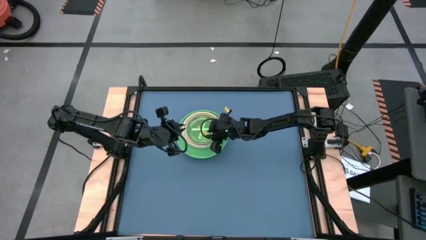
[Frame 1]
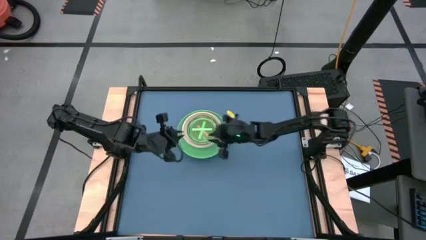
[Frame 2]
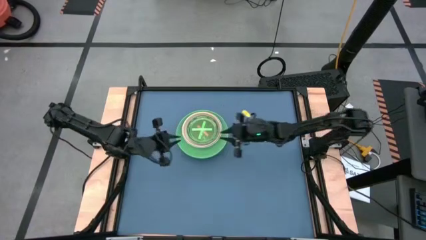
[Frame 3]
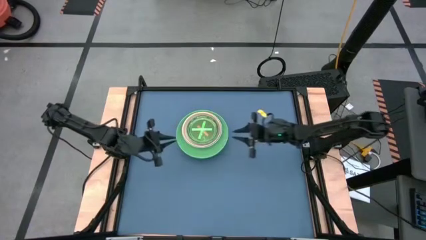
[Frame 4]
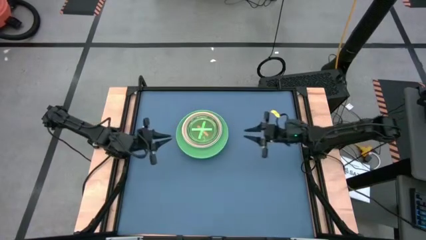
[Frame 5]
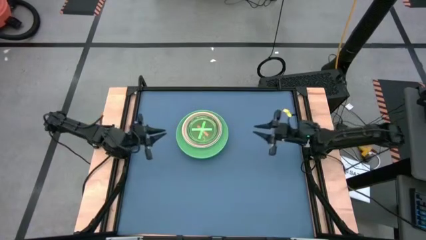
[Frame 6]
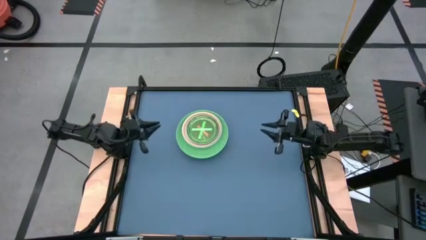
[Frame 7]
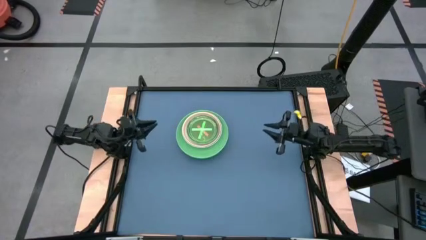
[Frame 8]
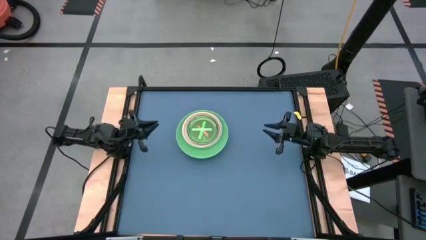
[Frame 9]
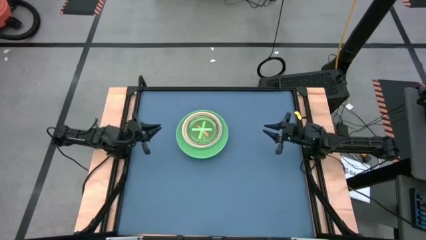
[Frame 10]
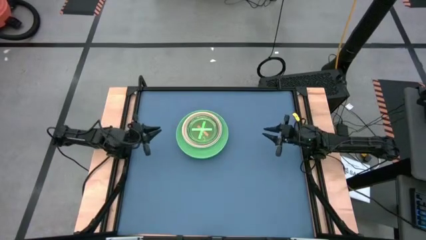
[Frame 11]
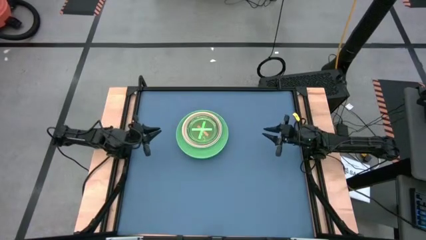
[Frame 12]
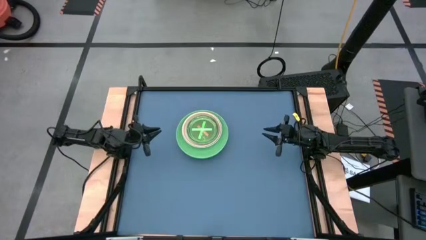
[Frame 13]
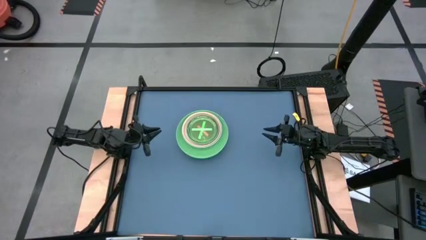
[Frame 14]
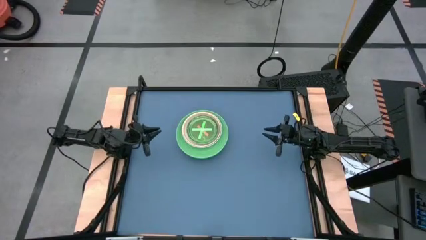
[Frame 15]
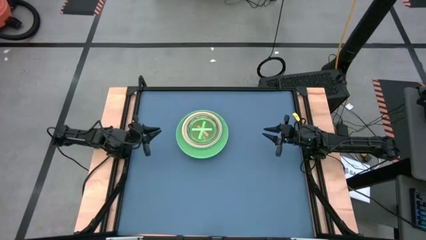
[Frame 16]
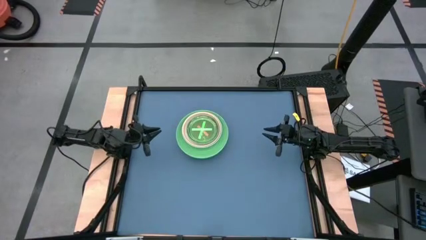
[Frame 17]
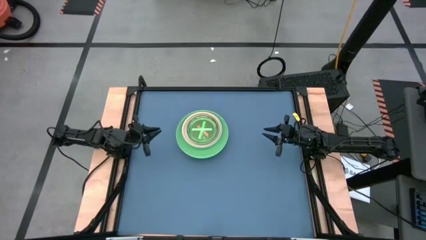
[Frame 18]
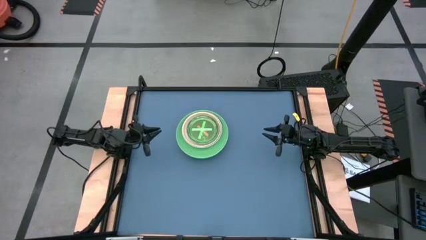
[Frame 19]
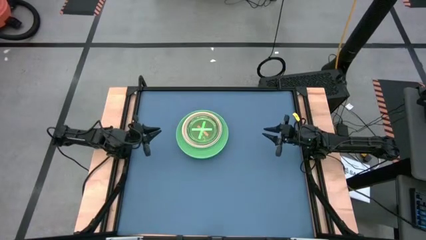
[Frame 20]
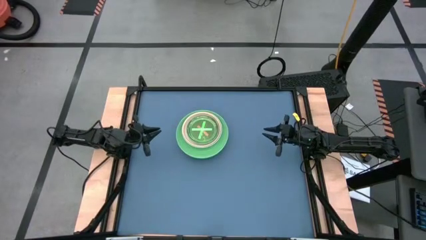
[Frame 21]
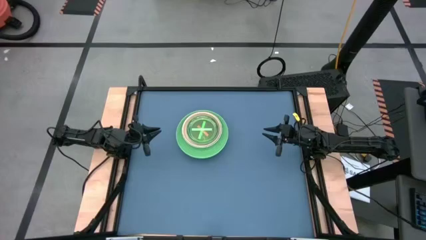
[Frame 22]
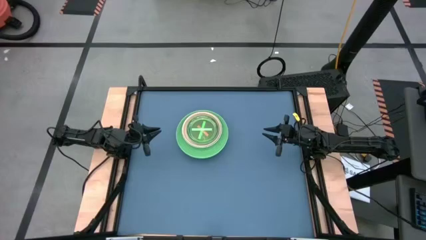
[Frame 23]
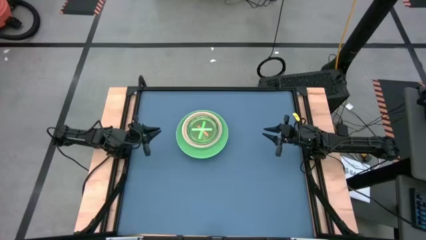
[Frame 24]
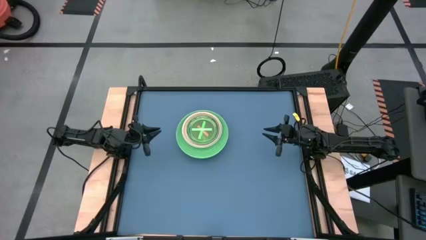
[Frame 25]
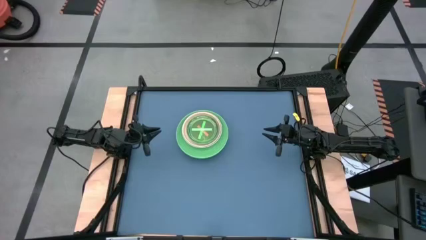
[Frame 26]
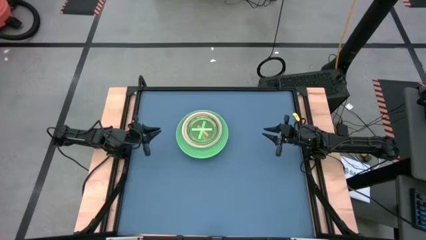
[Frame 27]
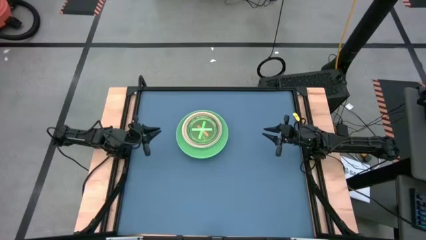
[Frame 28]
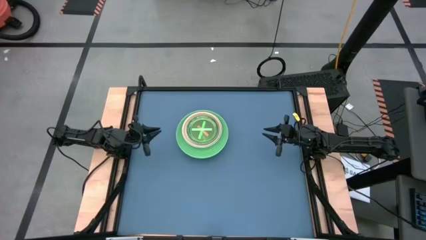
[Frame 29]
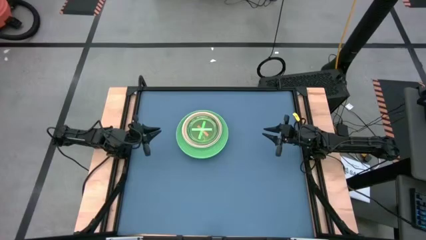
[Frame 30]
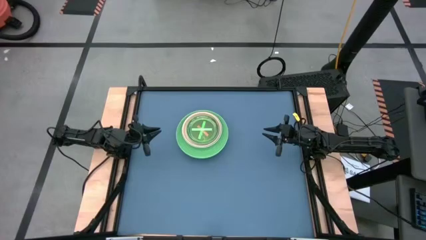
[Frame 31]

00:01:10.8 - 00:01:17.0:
Task: Stack plastic plates
Return to Home Position

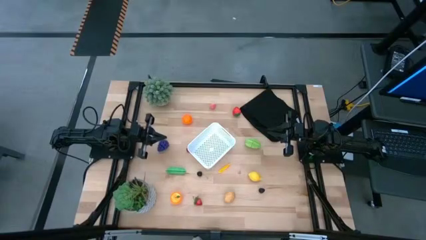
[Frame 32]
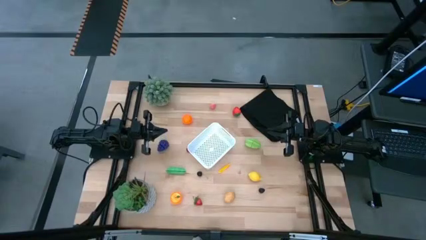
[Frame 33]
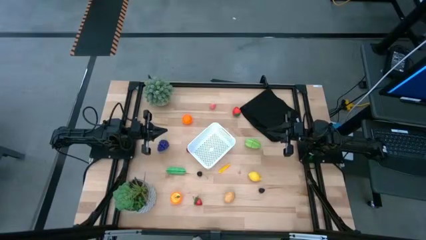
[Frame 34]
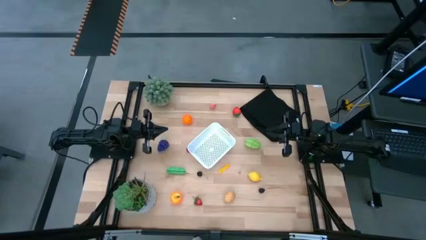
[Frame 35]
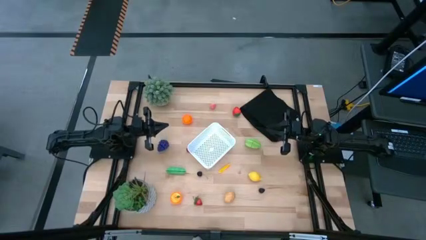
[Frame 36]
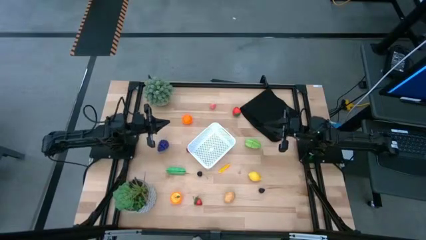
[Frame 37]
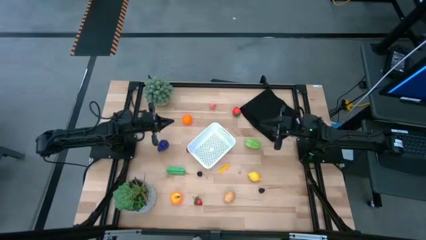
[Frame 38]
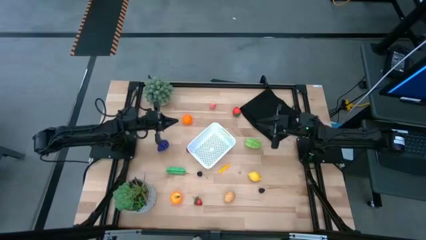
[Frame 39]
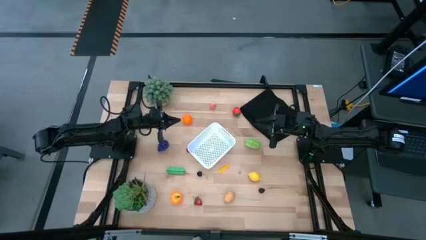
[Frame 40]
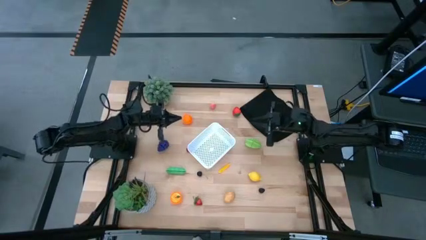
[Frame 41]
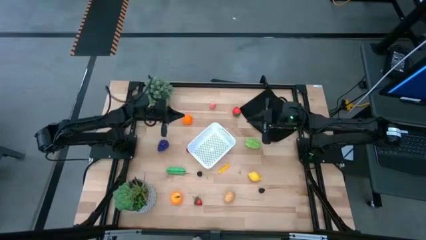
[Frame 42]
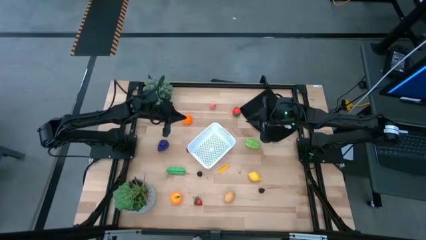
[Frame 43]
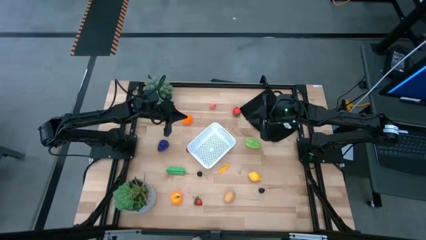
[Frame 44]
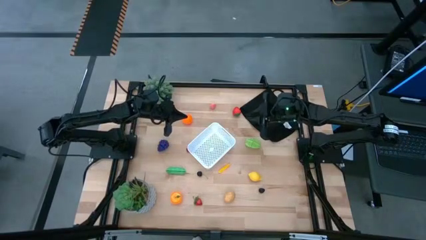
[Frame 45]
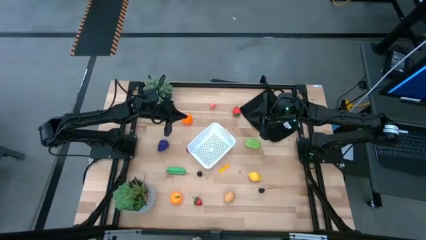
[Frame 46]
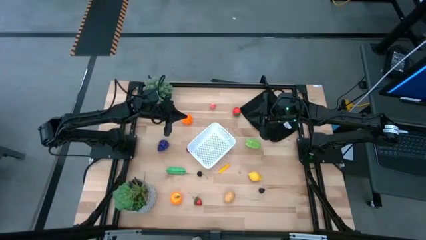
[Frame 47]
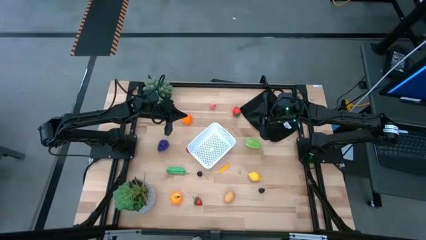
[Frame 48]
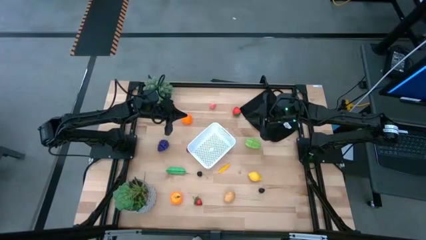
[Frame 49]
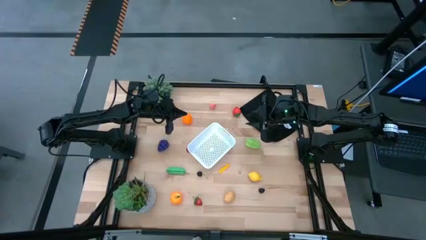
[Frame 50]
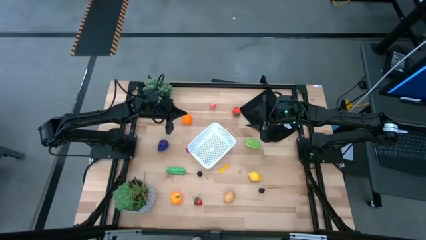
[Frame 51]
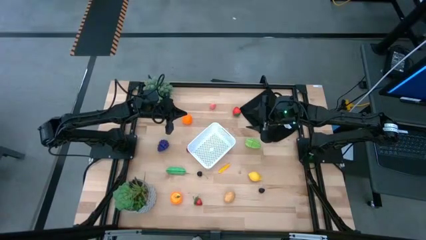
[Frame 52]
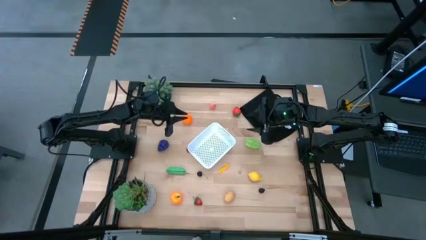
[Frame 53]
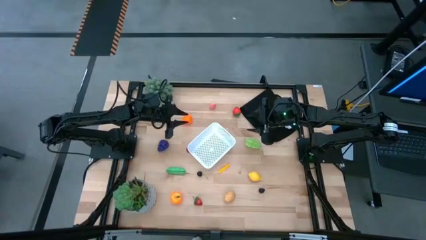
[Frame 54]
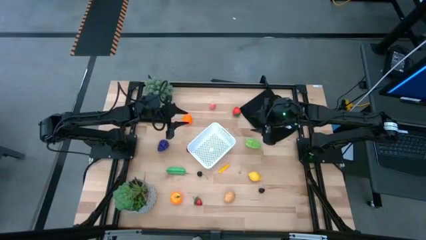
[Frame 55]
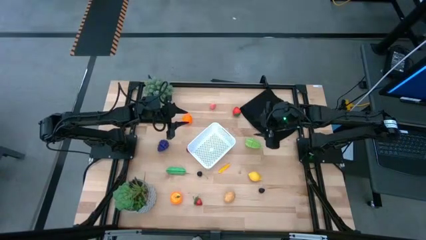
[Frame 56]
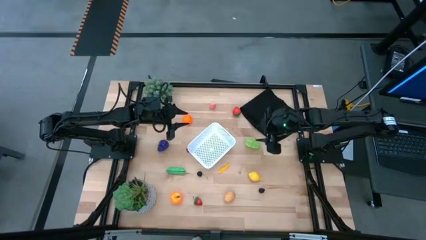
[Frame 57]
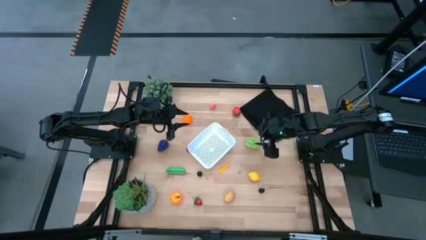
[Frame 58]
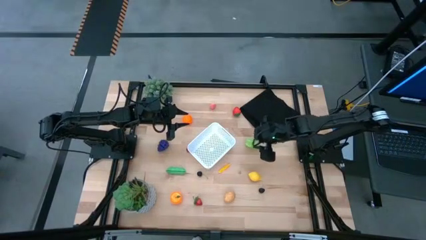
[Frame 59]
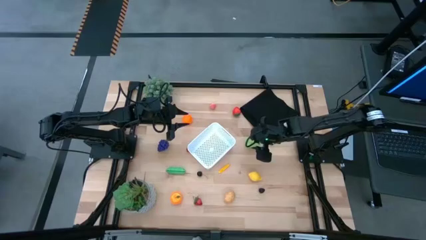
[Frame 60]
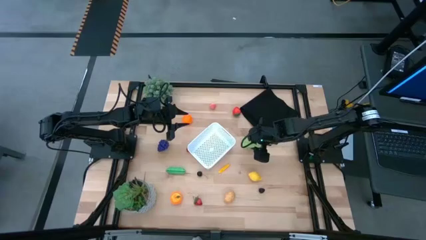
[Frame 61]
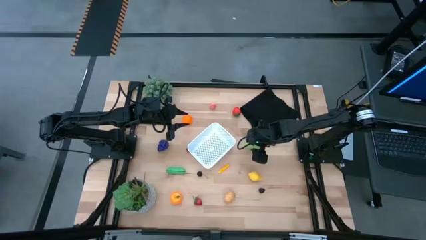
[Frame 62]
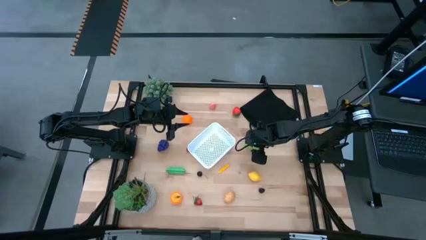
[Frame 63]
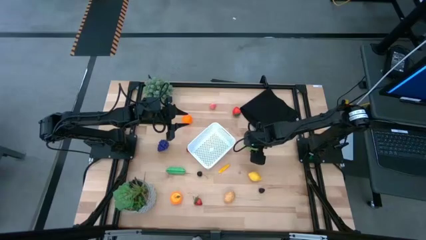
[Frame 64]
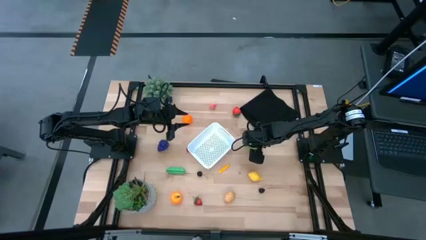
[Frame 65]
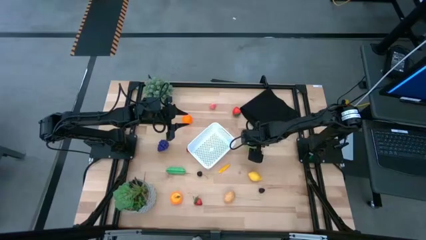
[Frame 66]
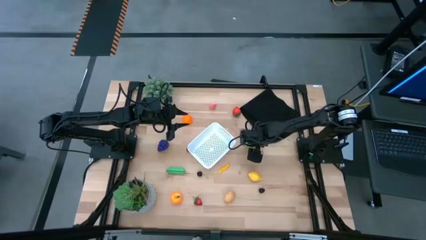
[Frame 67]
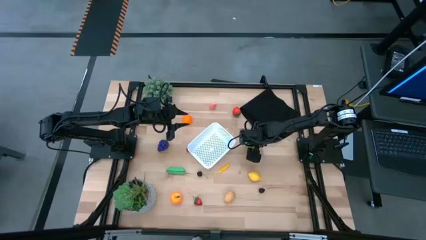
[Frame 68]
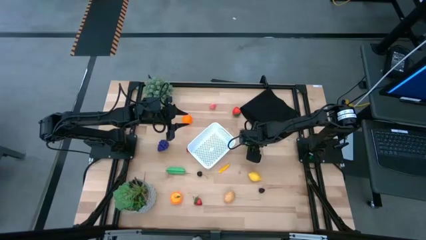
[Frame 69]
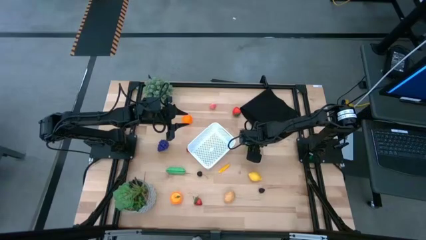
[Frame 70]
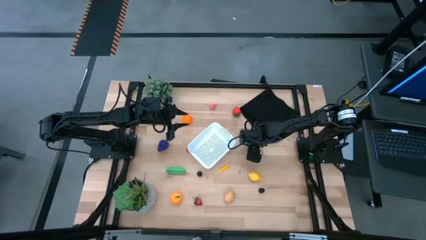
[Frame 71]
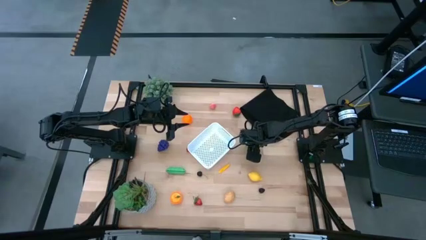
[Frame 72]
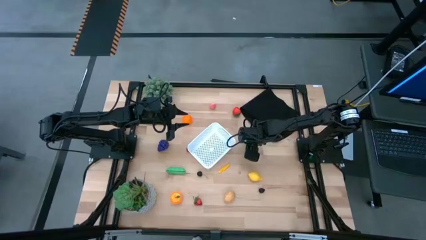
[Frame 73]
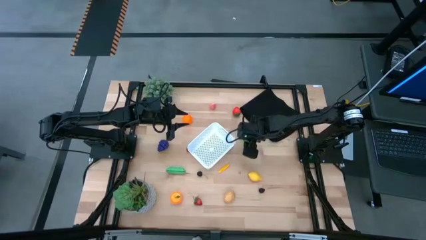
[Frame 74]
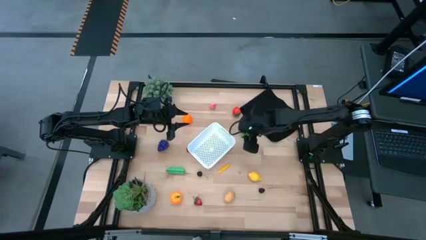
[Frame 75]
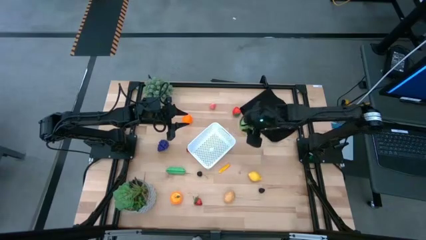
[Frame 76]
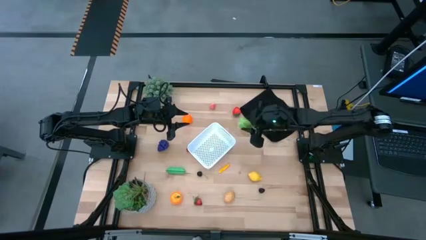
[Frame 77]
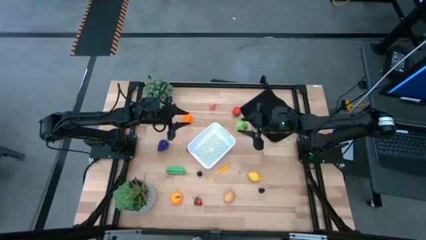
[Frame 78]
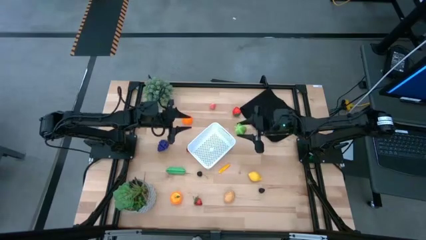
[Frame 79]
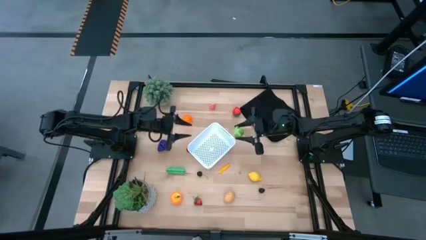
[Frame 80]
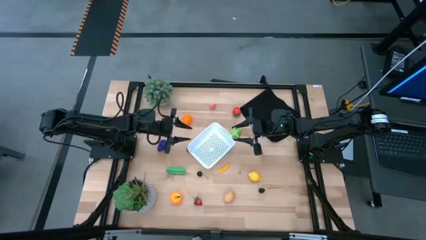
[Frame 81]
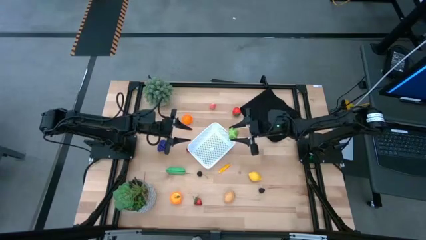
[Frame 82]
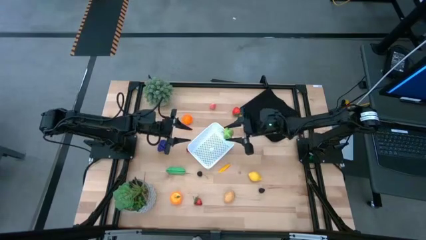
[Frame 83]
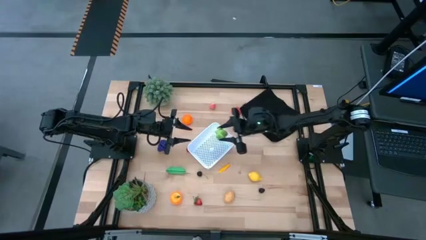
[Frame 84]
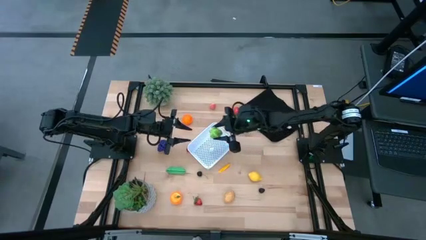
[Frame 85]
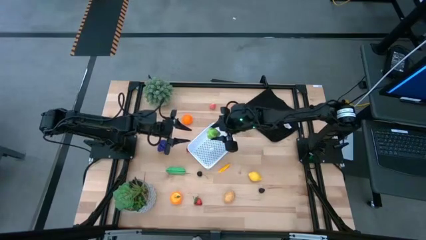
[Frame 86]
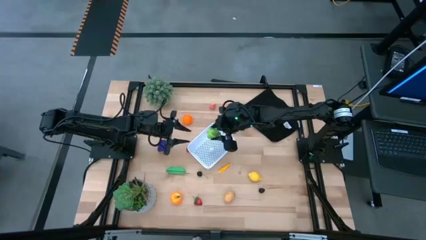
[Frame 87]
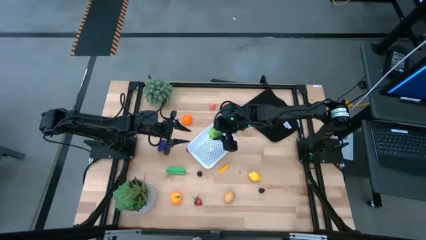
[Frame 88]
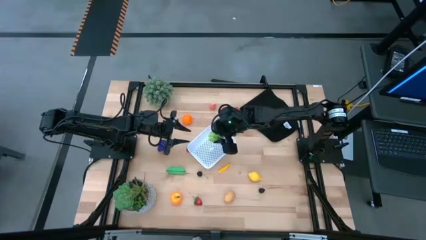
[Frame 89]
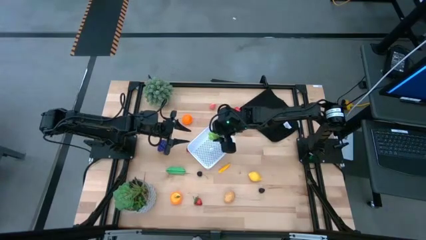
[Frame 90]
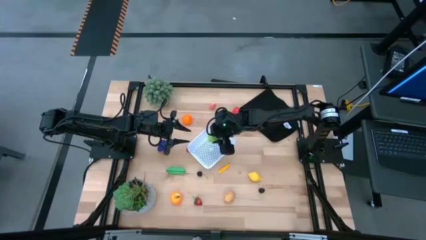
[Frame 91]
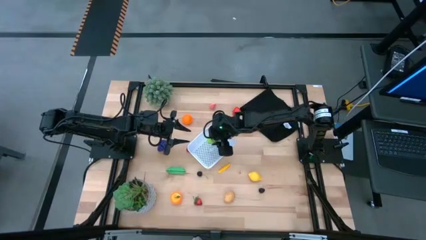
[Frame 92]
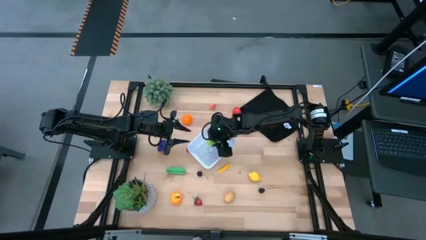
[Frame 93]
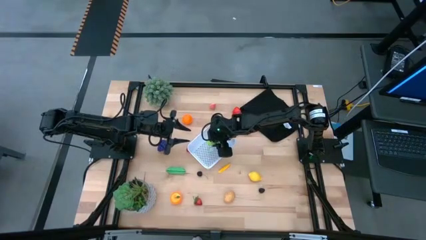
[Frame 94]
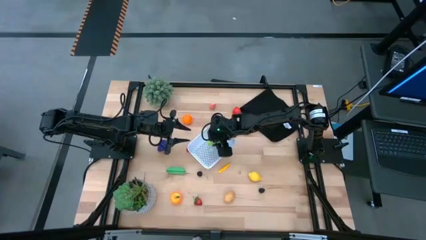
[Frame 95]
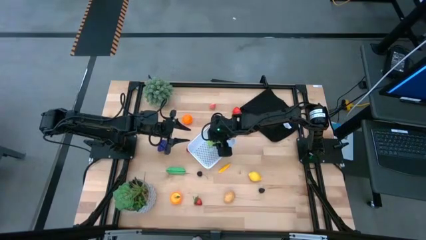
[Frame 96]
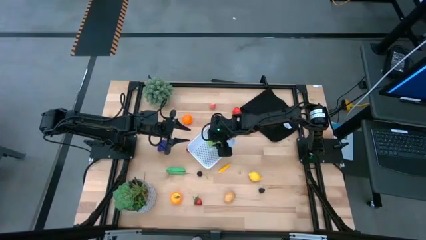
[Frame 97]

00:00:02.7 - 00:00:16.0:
Task: Pick and placing Produce into tupperware
Put the starfruit into the white bin
